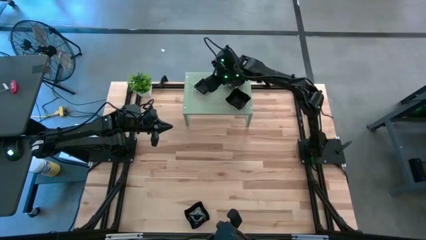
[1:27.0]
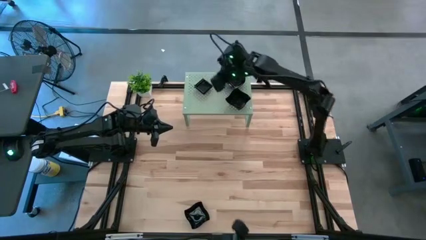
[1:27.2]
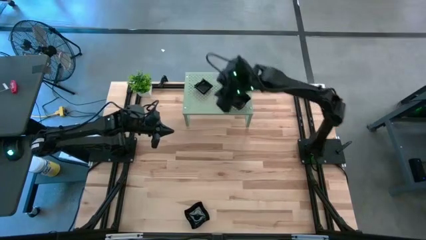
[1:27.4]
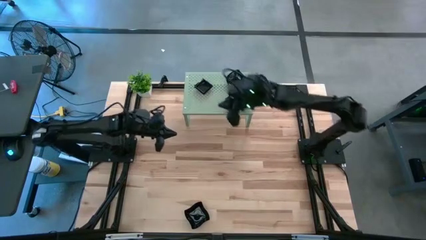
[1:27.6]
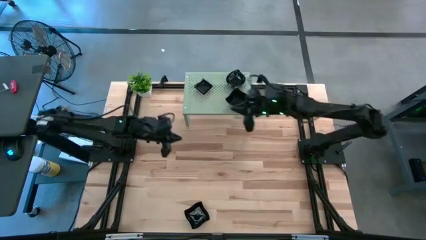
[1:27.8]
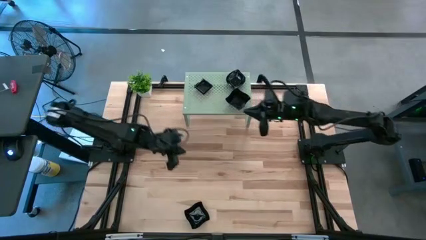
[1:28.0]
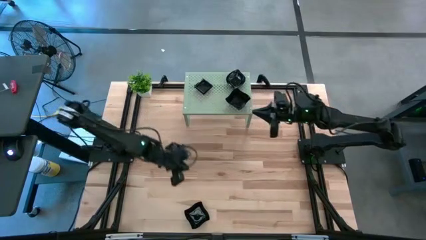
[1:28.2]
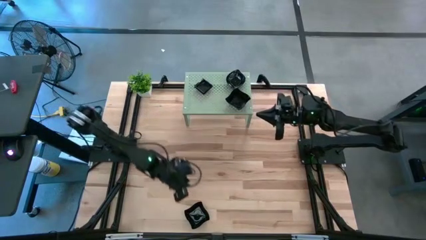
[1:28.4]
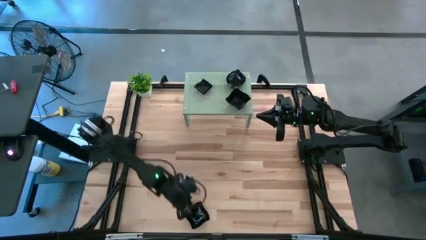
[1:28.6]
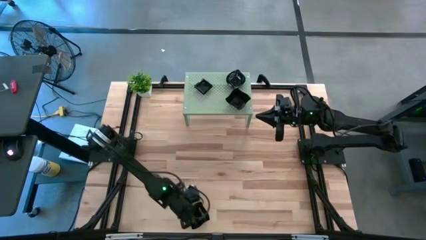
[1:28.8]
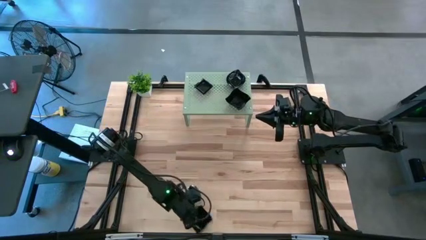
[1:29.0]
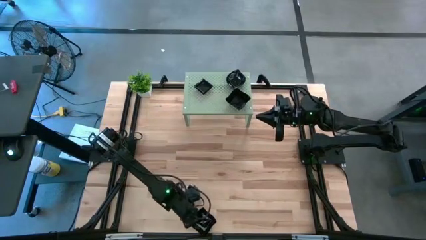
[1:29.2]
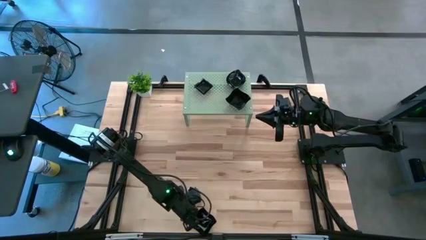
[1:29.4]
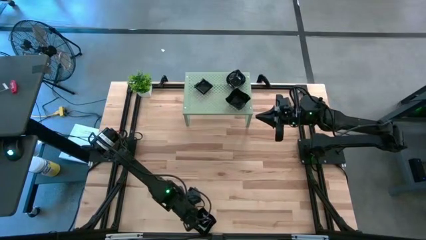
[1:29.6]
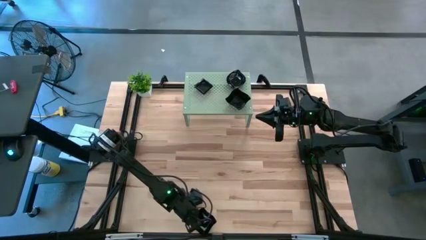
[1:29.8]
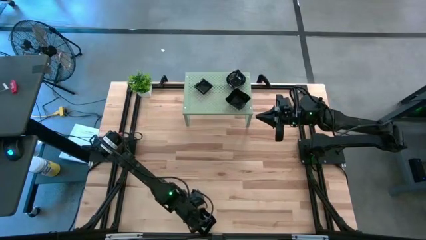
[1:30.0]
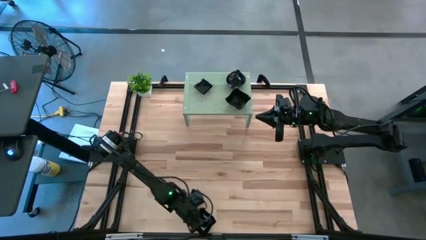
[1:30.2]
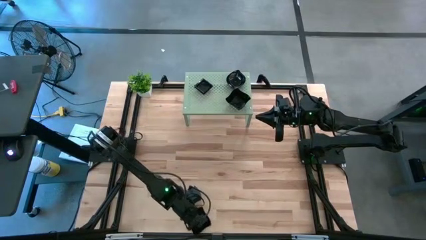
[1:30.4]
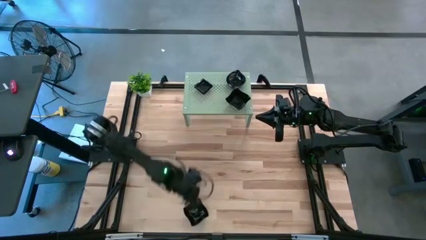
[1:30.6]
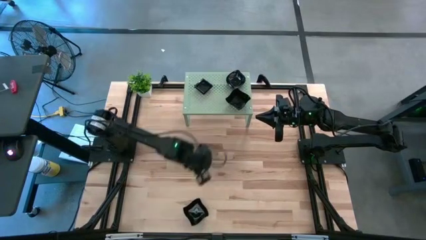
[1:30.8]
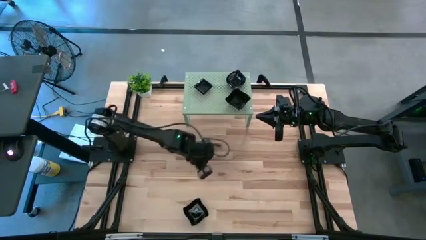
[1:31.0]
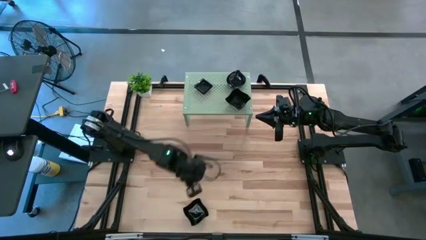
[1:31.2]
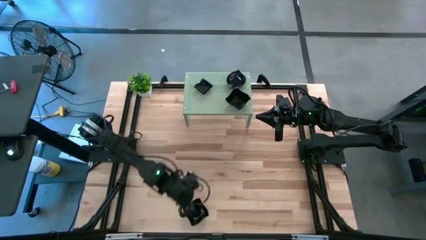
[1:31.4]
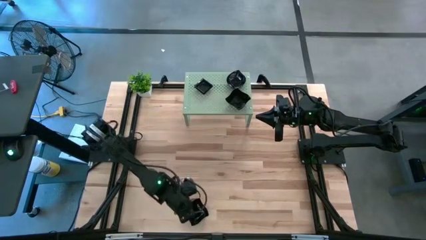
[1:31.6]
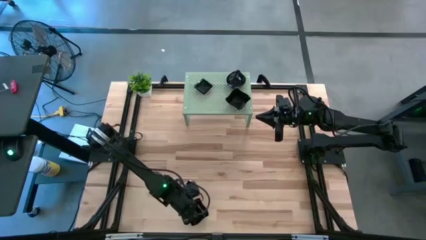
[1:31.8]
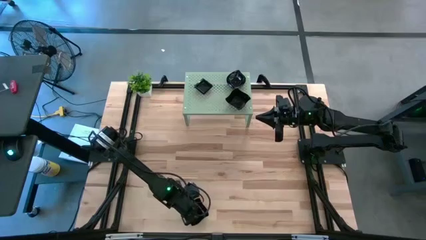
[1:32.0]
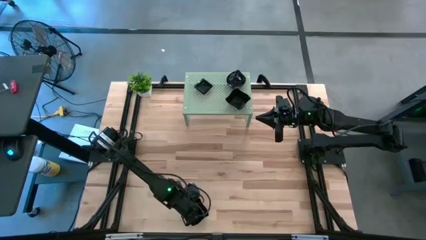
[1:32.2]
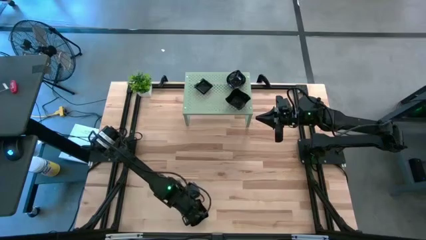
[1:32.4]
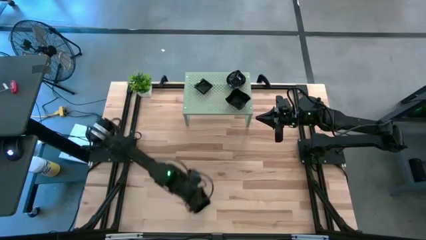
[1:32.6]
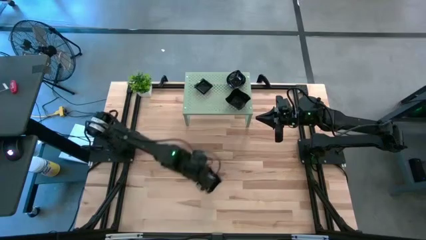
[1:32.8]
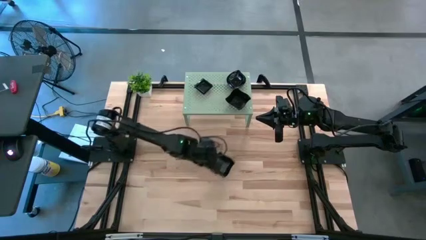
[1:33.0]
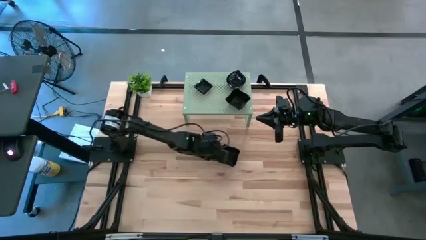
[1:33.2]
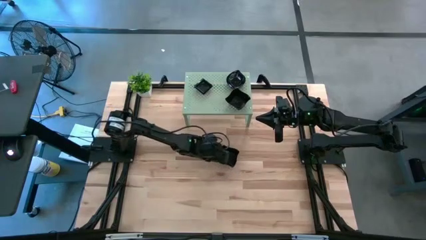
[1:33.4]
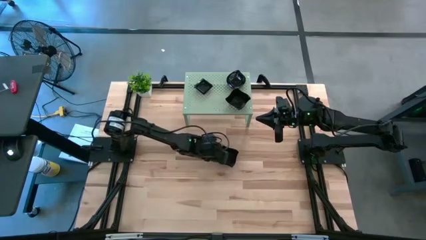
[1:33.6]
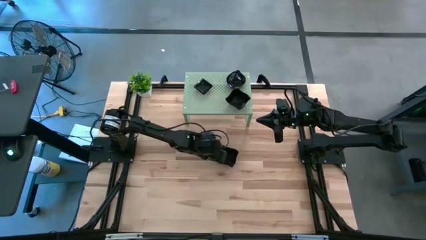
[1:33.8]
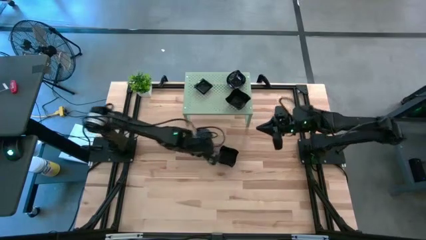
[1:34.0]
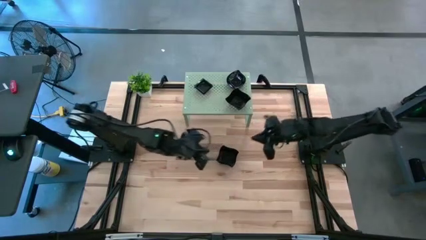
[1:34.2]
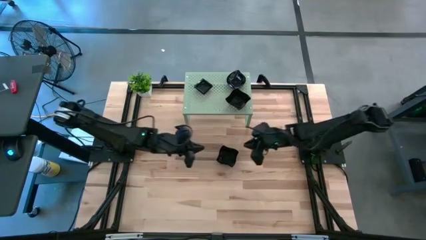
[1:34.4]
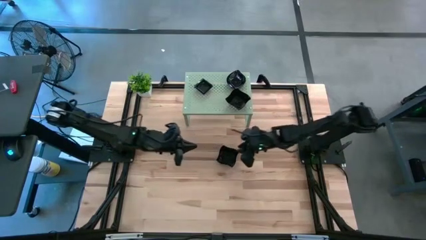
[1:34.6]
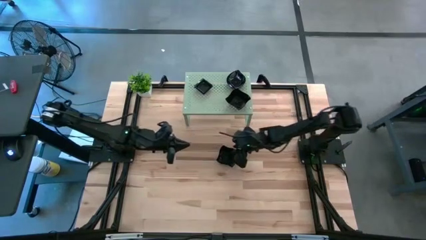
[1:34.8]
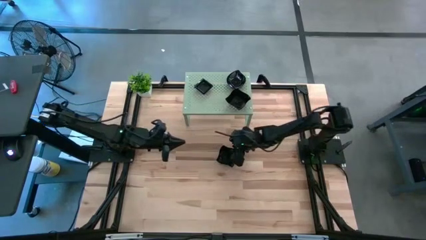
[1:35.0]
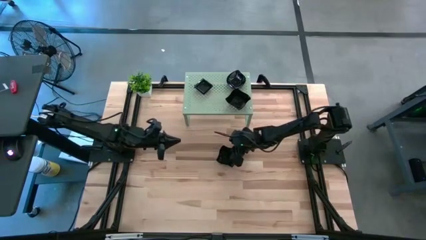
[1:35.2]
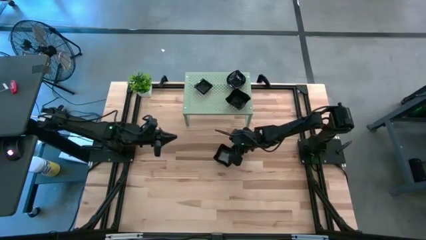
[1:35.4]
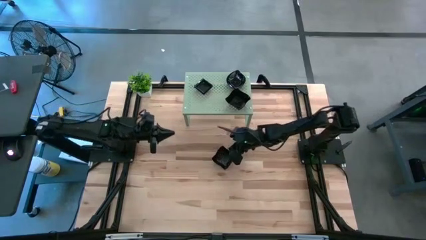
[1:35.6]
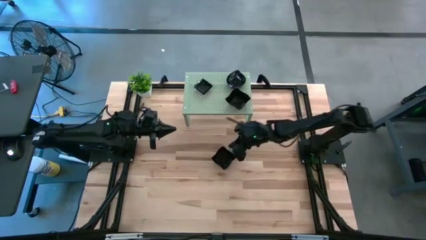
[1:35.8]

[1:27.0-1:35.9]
Task: Pick & Place Mini shaped plates
Stack the black distorted square plate on top of the black distorted square plates on the shelf

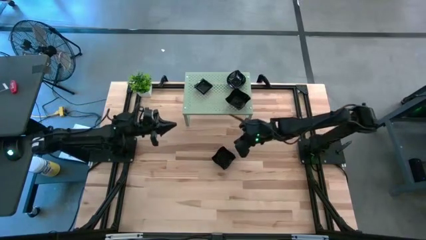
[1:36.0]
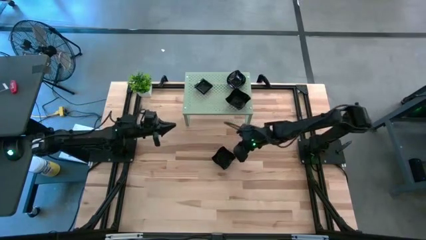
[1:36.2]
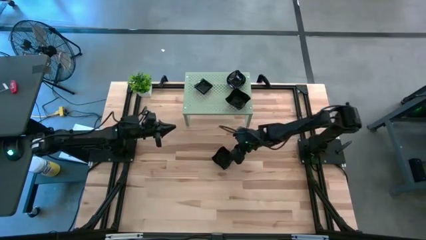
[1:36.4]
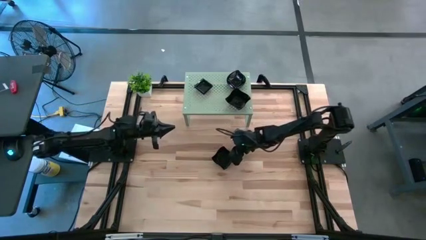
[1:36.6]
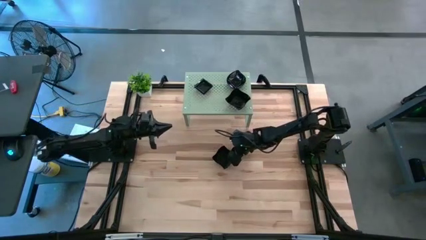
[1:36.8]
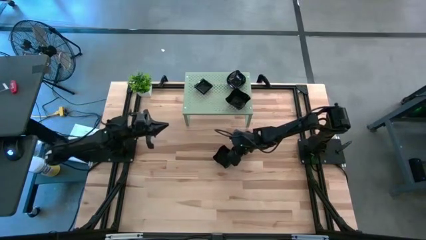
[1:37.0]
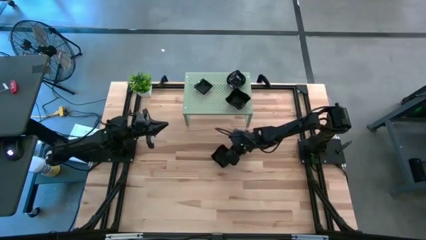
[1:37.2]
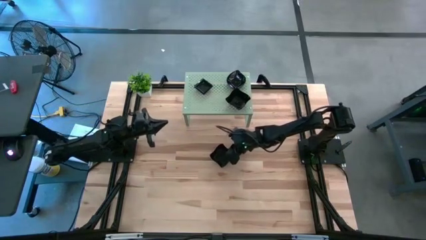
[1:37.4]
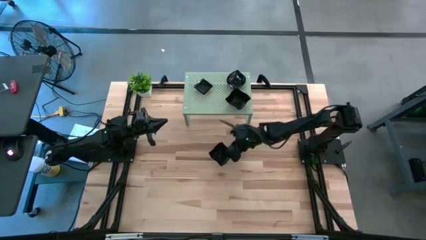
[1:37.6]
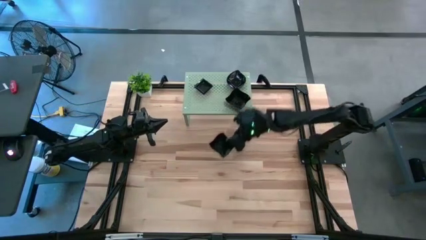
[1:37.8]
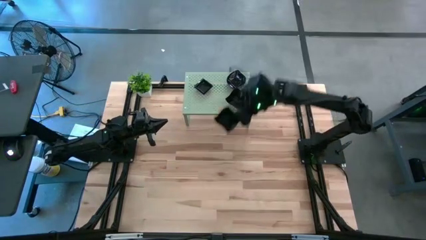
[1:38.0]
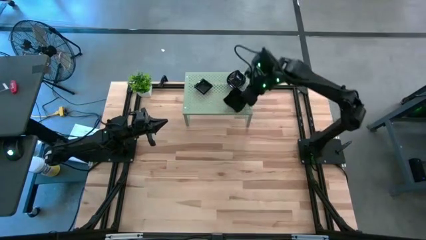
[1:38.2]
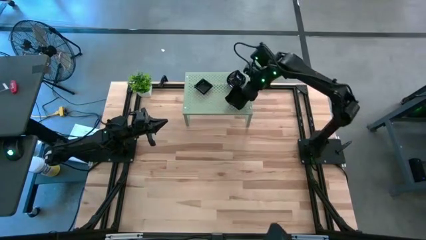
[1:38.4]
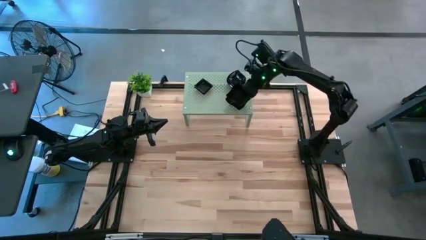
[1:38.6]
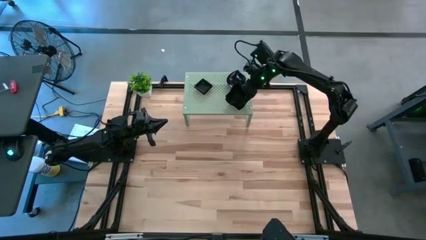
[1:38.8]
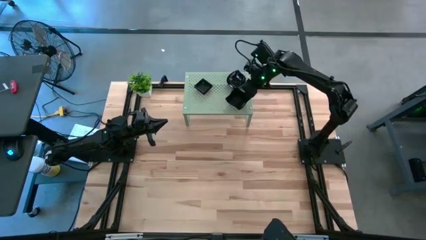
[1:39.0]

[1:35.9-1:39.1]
Stack the black distorted square plate on top of the black distorted square plates on the shelf

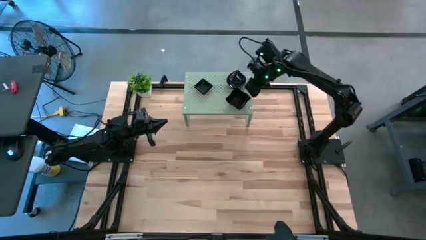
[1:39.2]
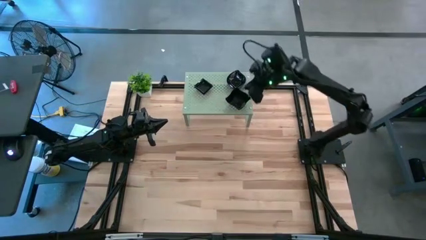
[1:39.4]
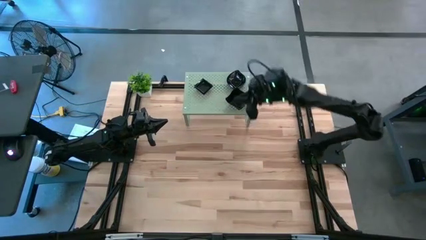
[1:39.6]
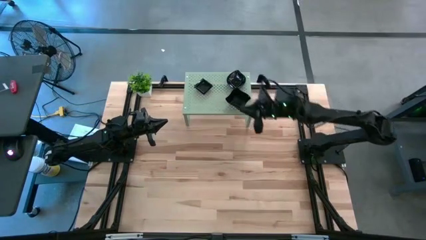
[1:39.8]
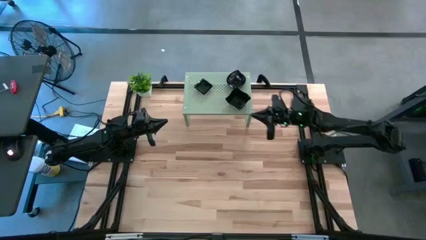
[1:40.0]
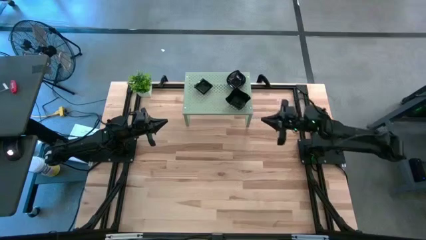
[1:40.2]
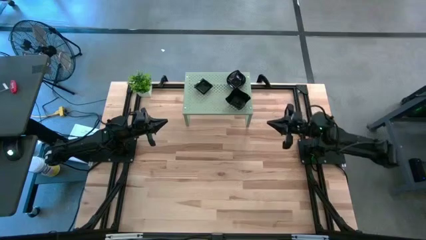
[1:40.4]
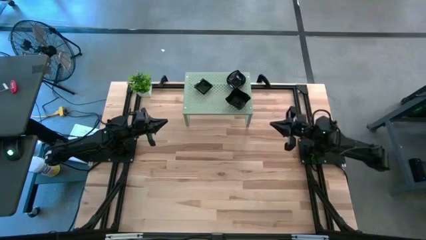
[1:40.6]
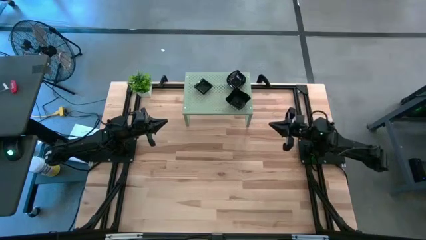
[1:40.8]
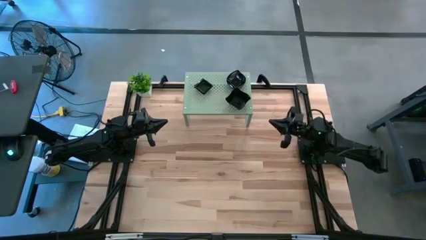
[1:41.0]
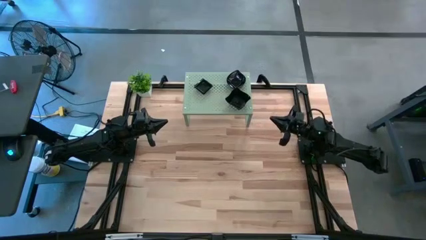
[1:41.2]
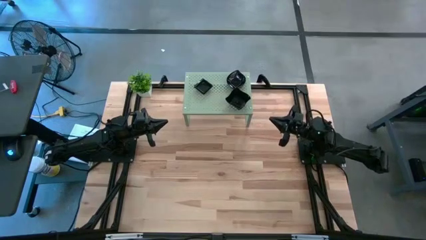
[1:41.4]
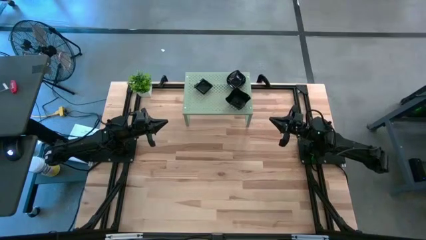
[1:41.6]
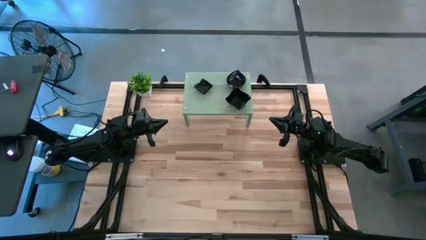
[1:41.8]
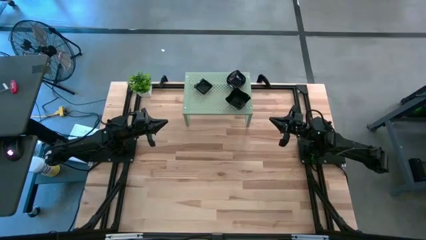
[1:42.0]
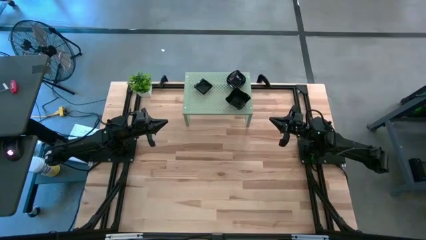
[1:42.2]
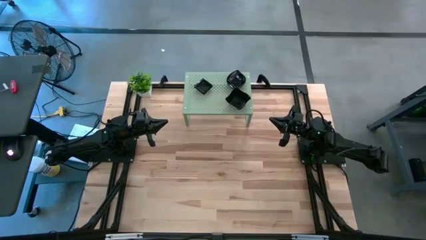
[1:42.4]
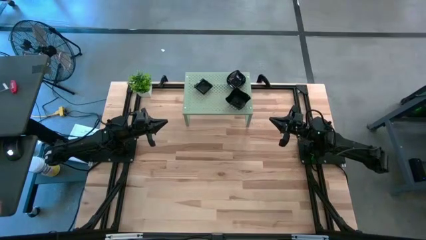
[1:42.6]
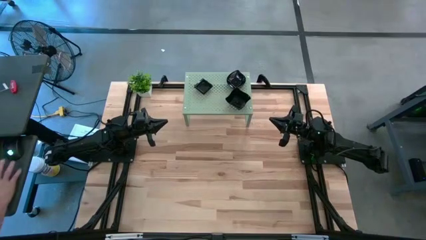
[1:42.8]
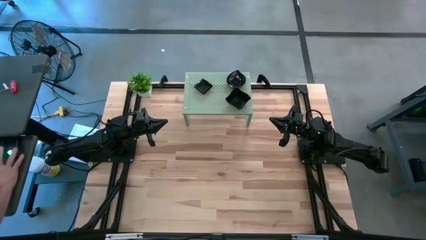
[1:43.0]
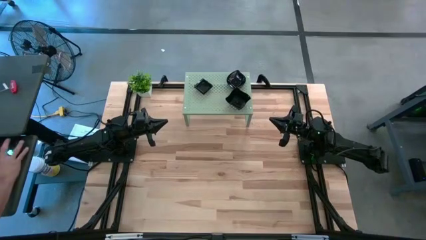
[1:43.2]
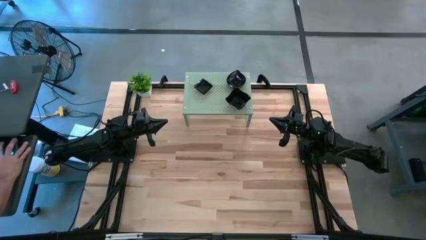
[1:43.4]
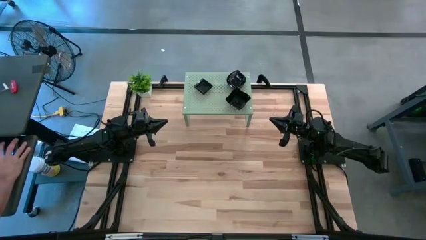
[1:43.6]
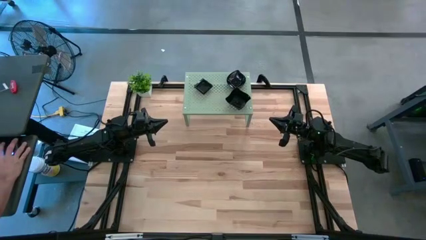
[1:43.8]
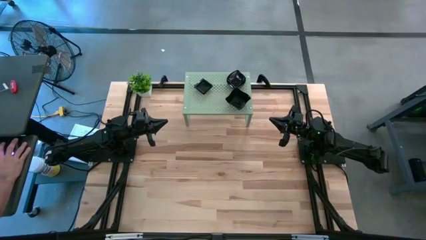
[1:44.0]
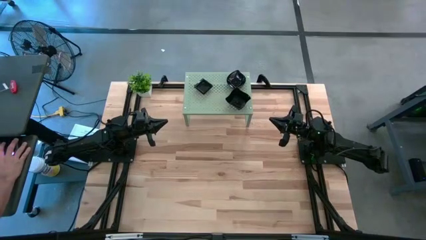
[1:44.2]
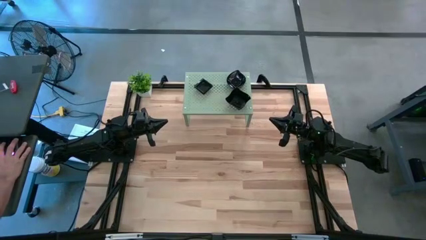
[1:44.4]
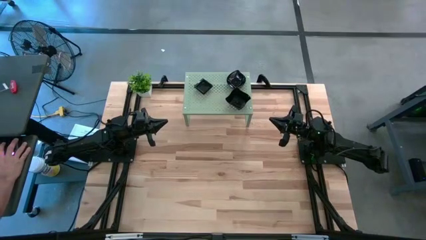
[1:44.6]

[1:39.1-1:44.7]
Return to Home Position
